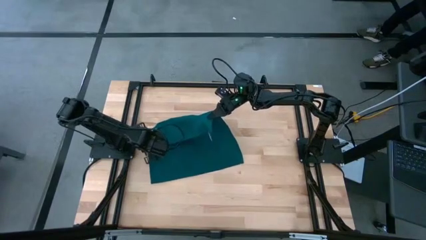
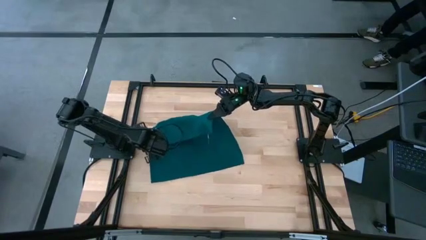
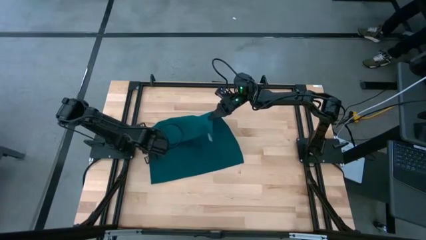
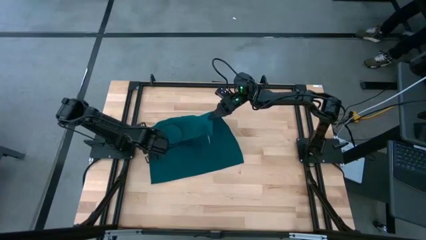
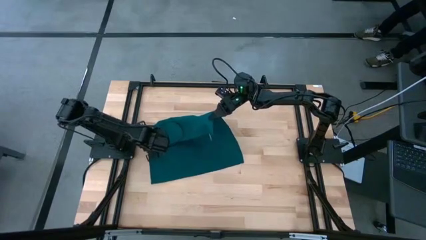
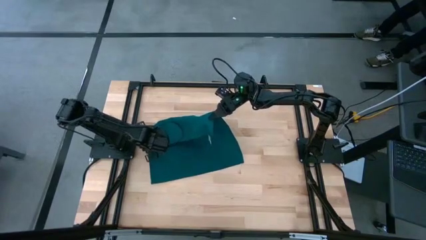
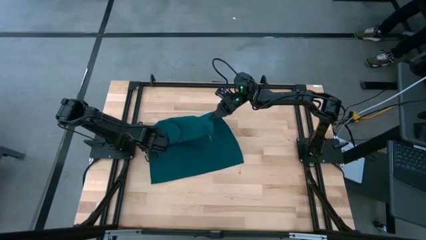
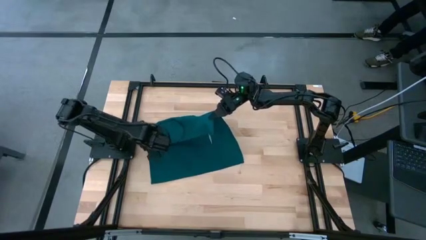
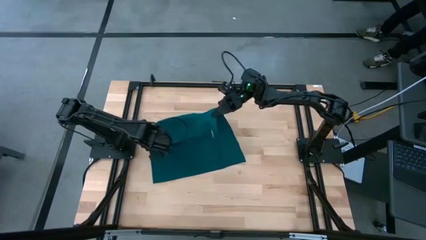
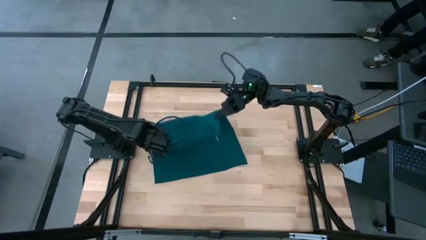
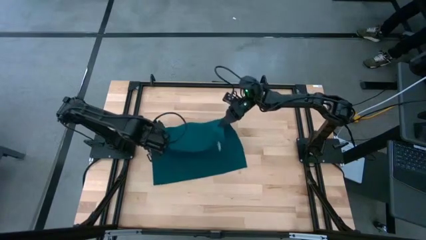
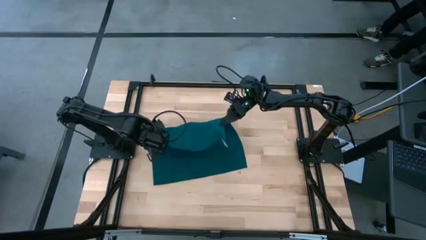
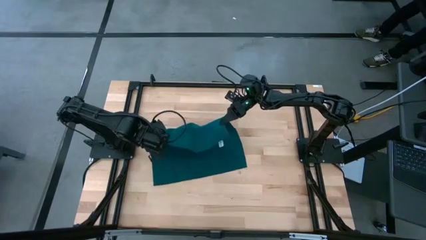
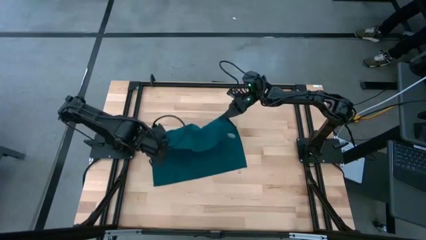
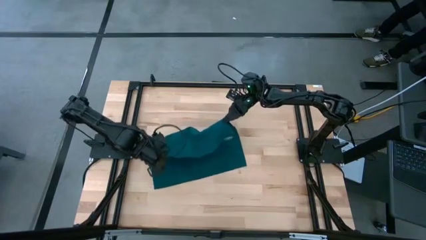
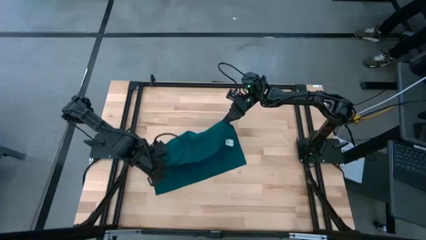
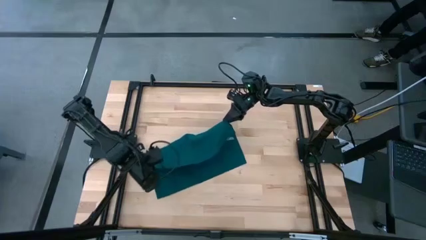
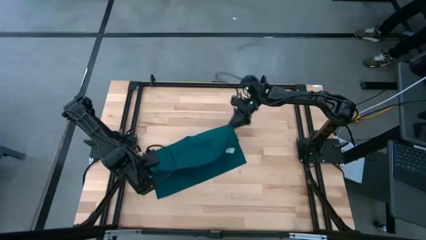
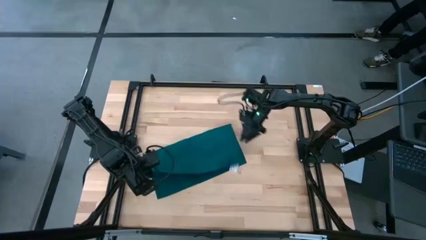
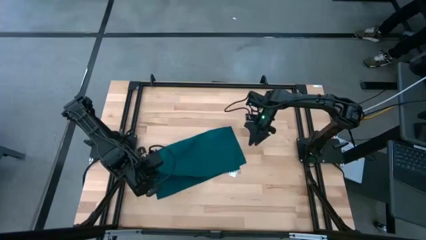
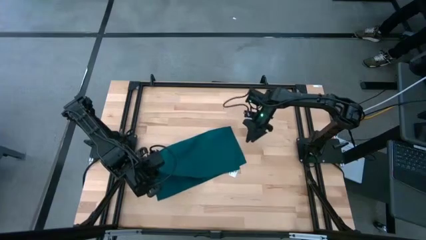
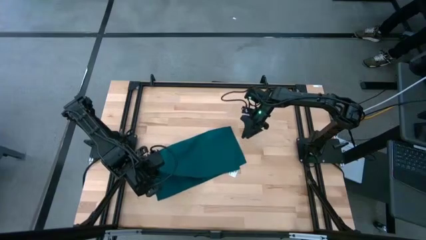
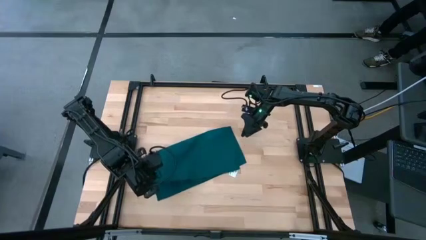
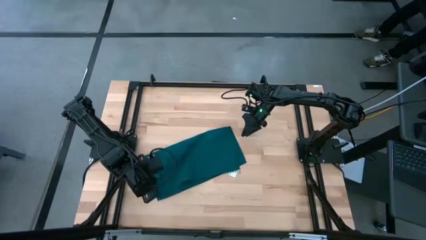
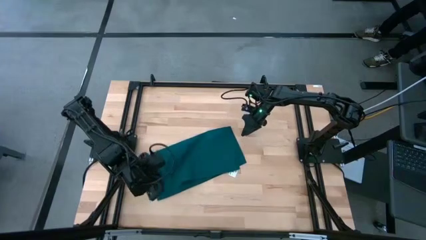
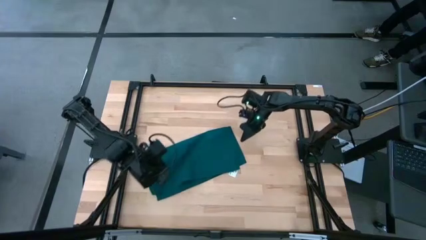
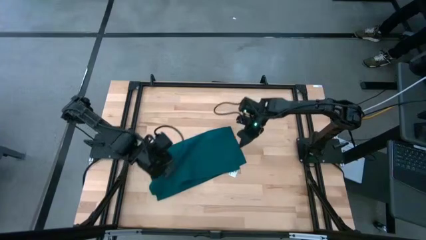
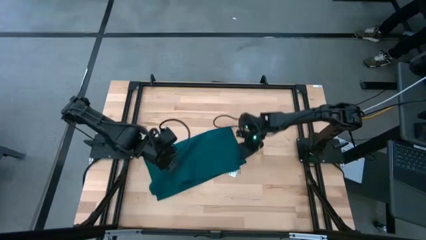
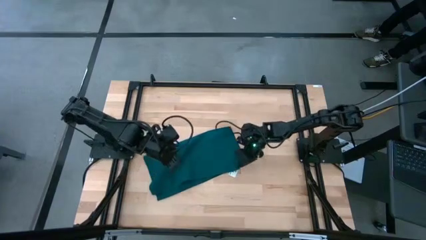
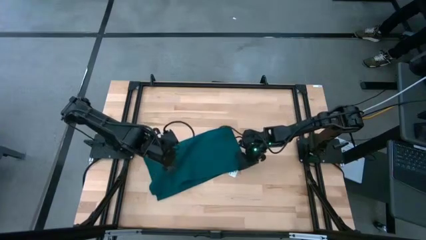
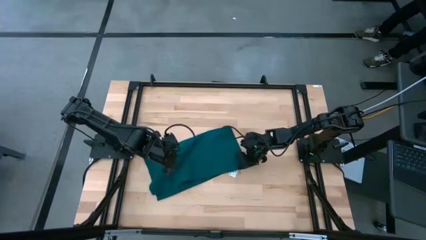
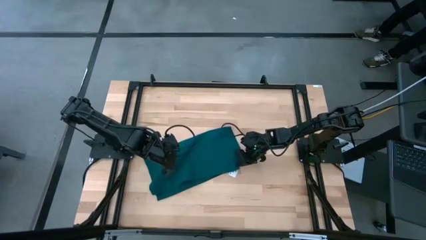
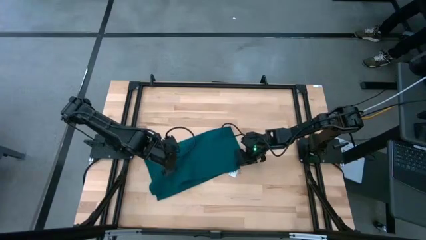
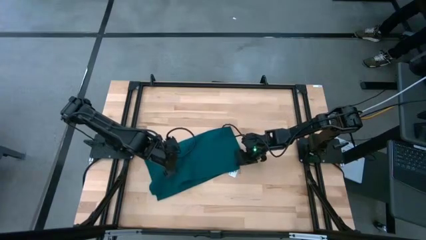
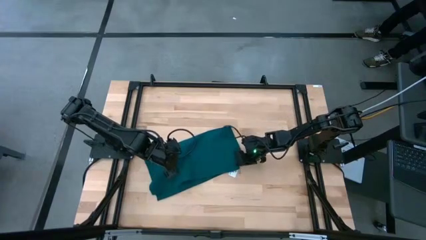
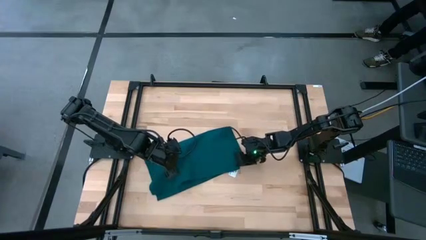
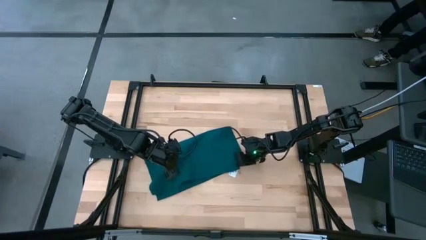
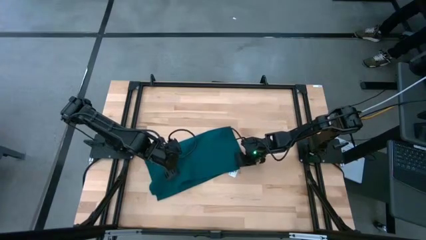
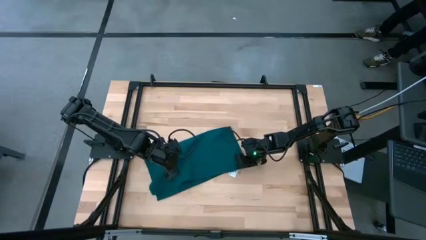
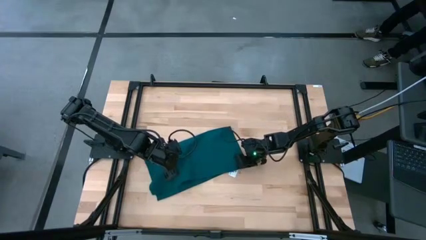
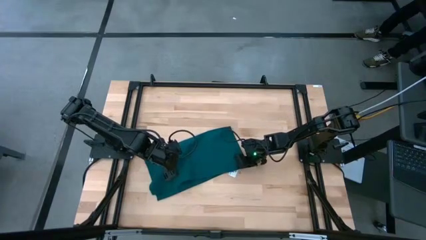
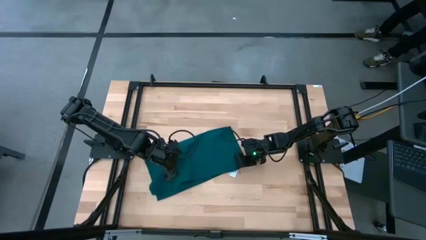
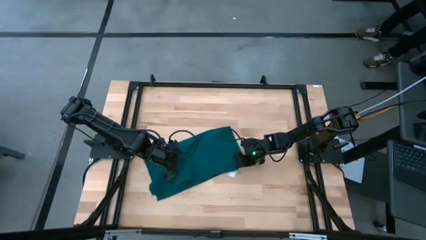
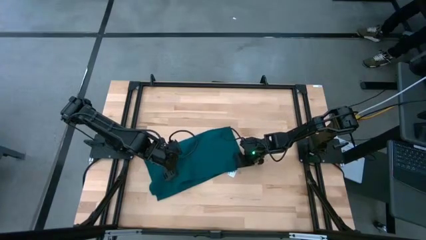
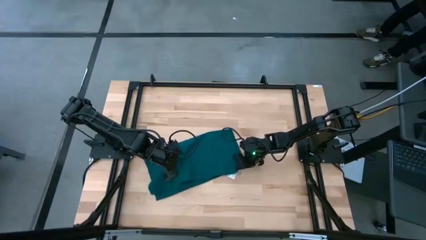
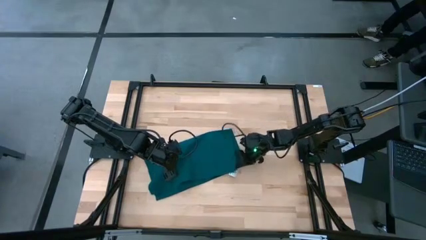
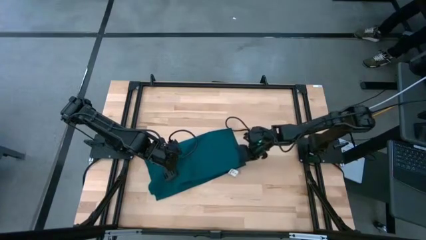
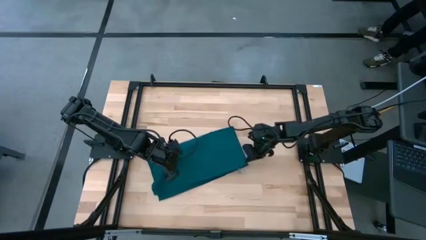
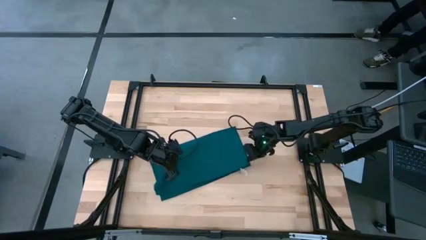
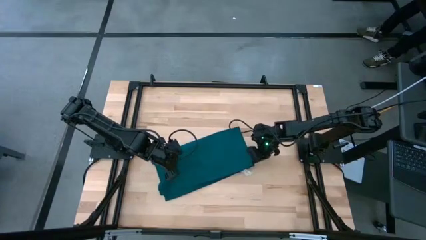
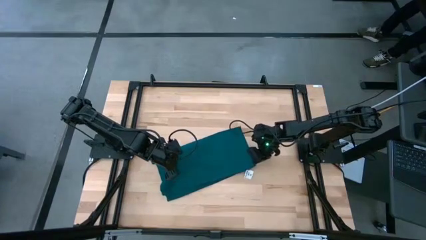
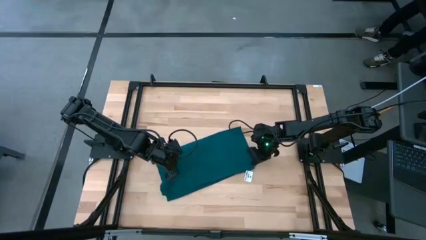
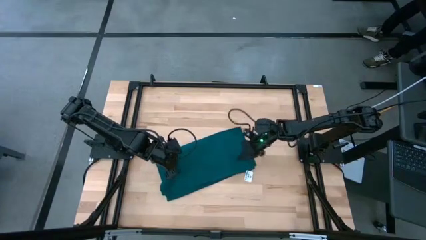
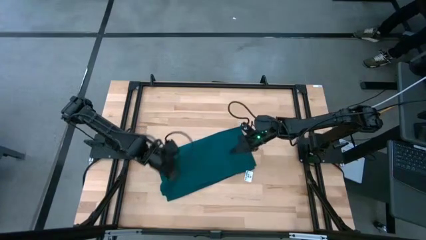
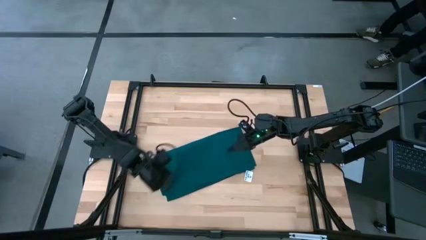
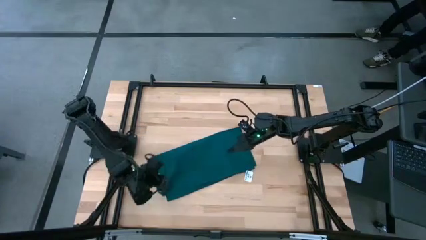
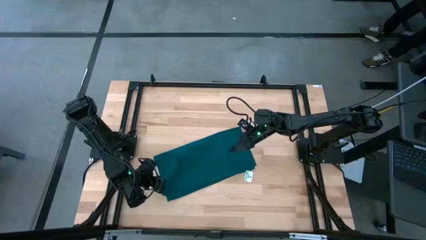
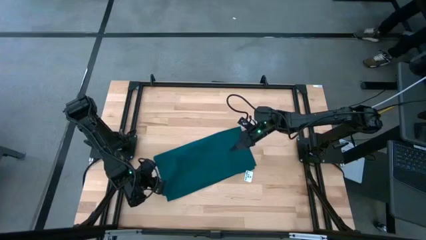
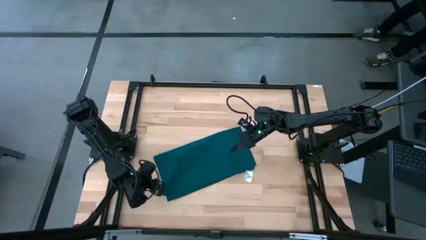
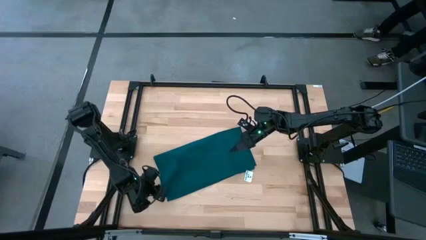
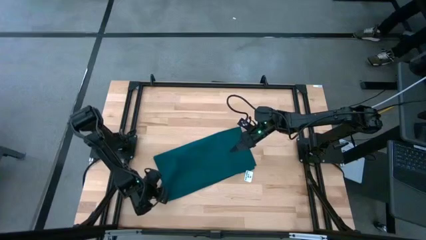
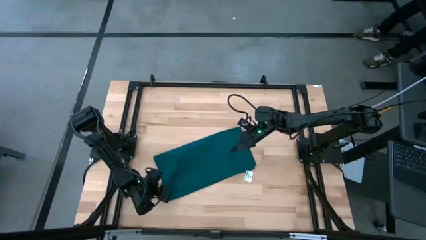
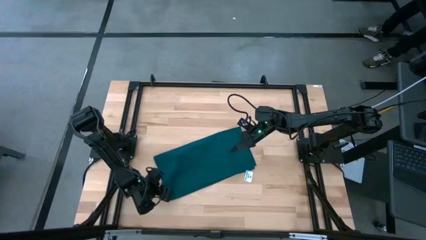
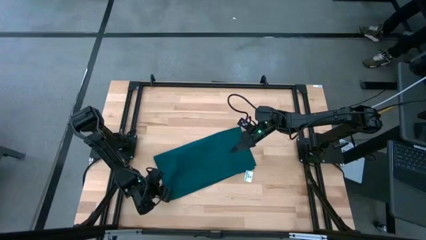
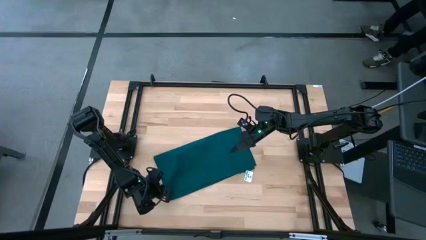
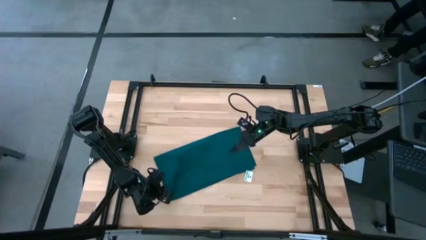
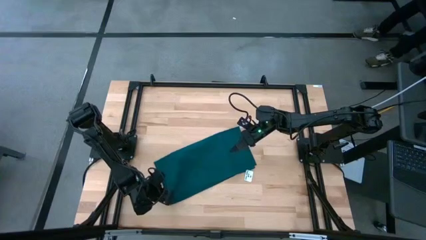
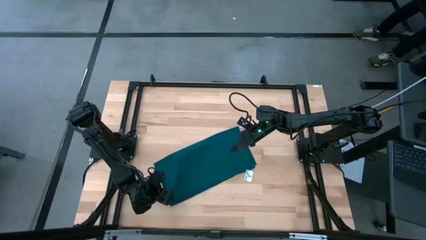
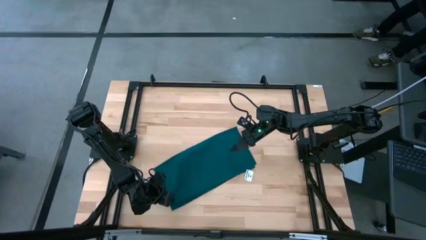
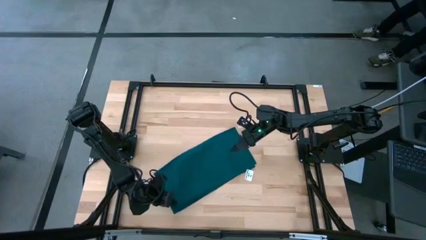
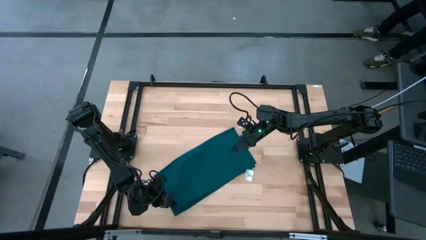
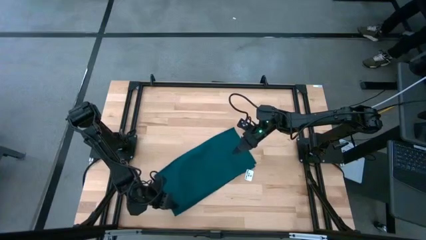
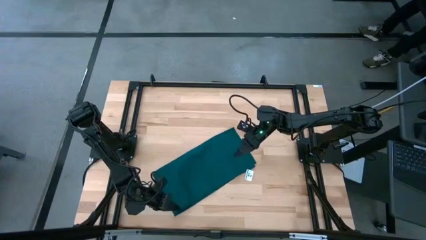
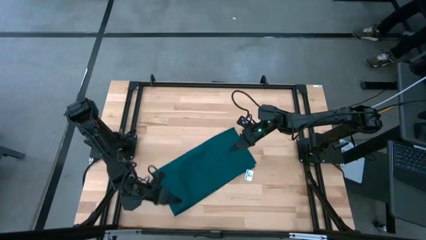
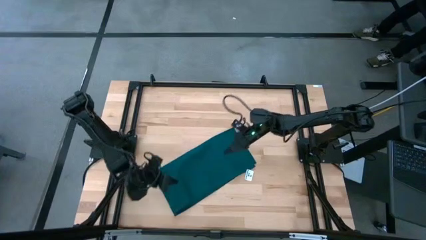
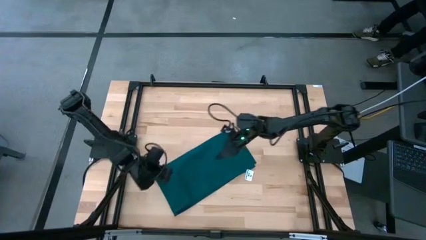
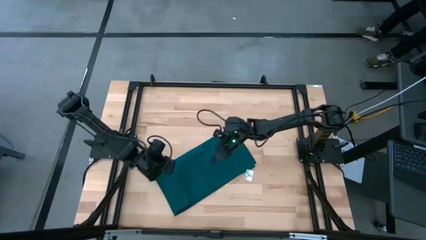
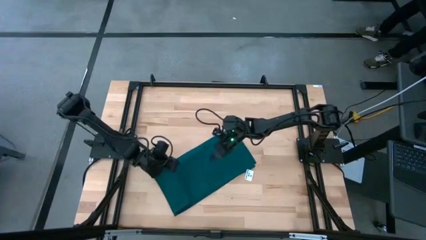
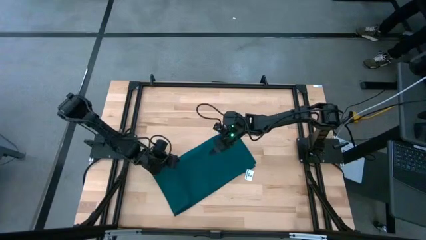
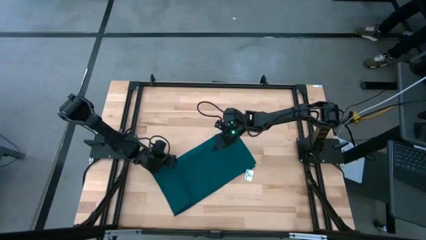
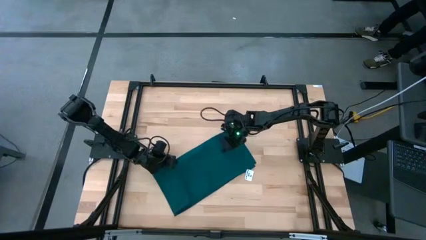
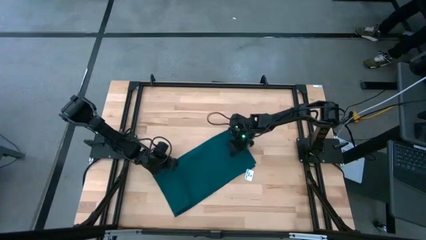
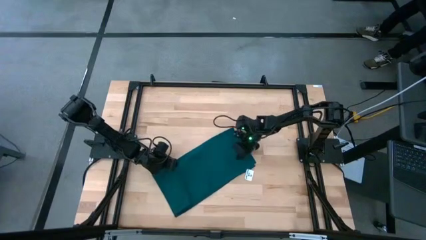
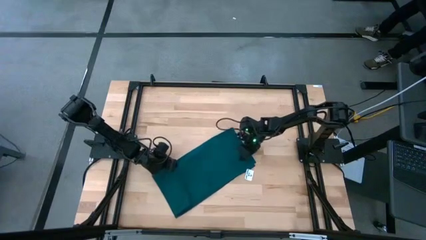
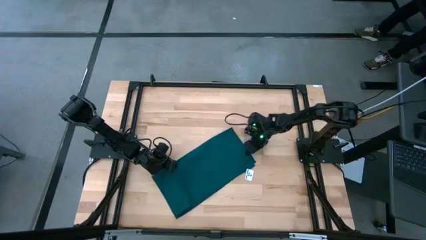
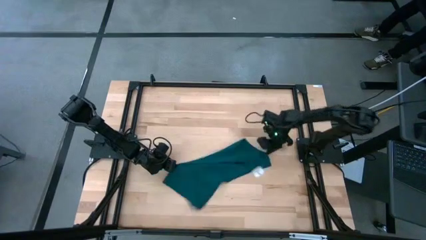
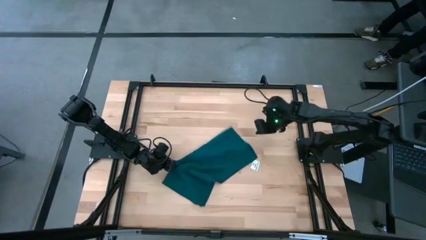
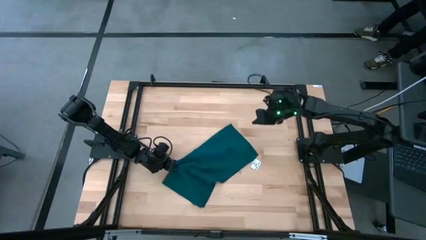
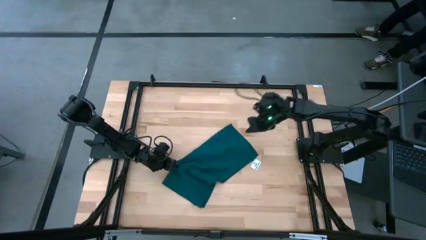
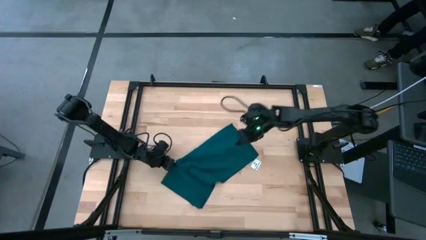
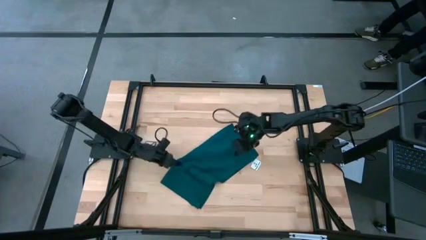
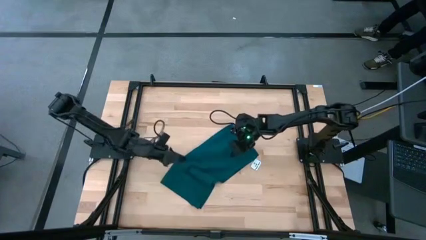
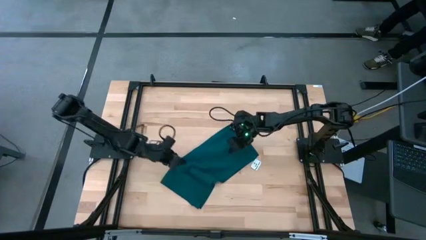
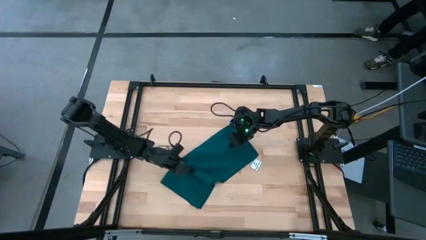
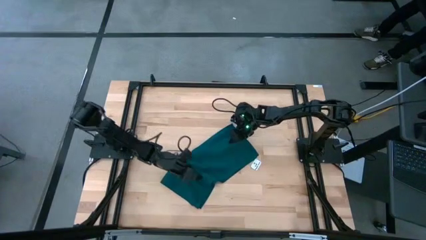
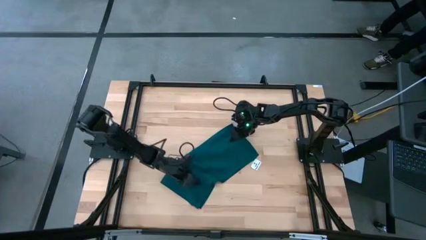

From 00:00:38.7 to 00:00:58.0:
Task: Fold microfiber towels
Fold the black towel on the table
